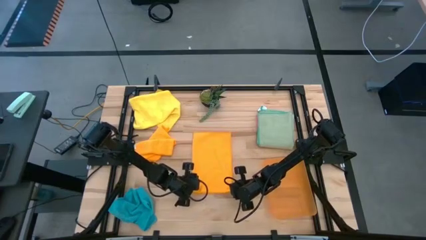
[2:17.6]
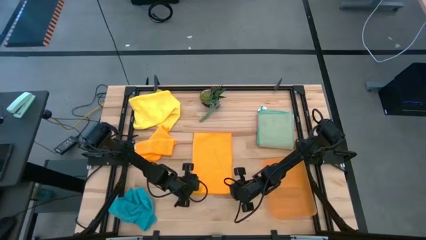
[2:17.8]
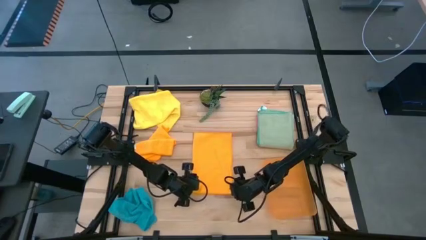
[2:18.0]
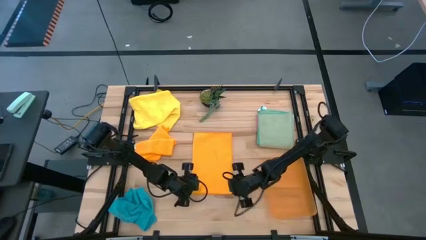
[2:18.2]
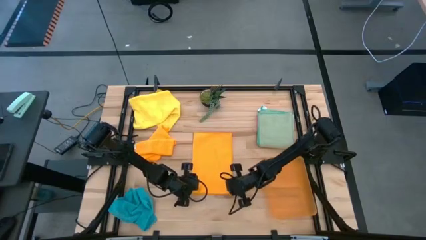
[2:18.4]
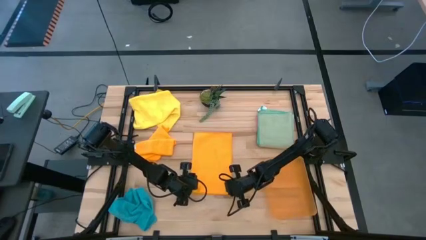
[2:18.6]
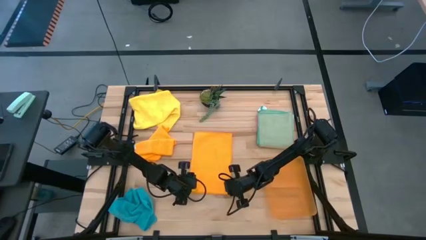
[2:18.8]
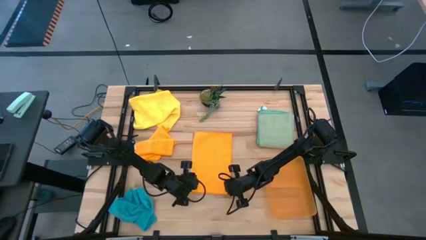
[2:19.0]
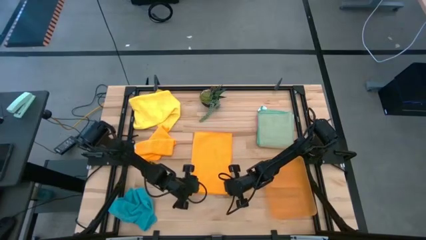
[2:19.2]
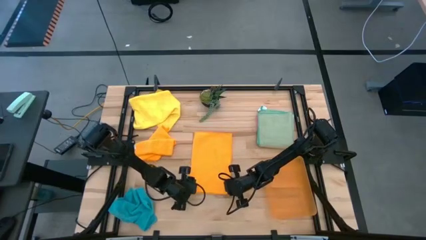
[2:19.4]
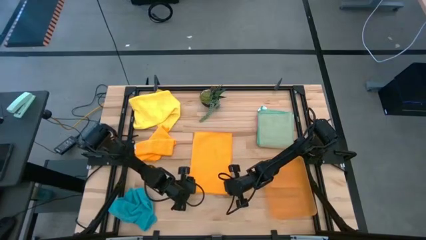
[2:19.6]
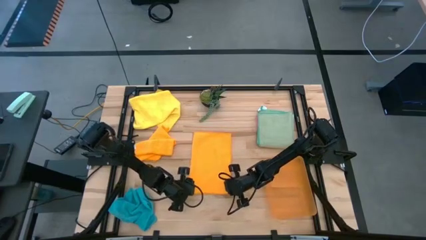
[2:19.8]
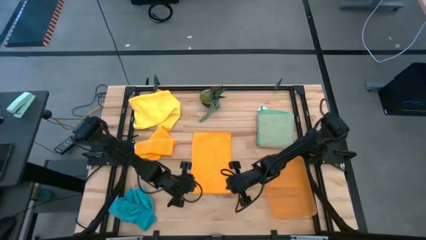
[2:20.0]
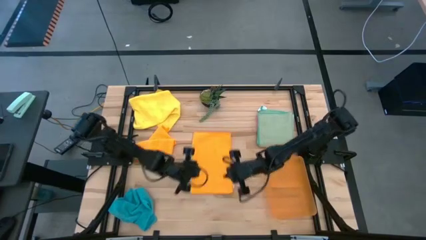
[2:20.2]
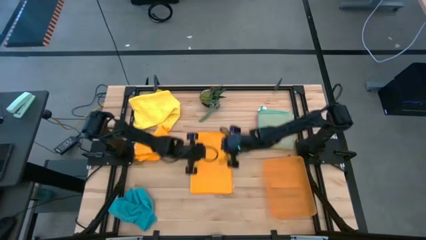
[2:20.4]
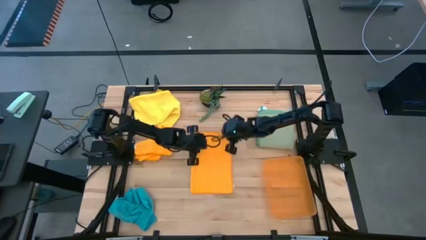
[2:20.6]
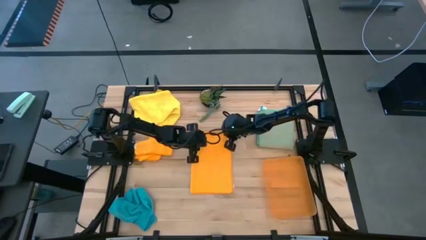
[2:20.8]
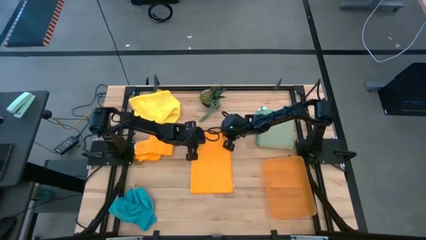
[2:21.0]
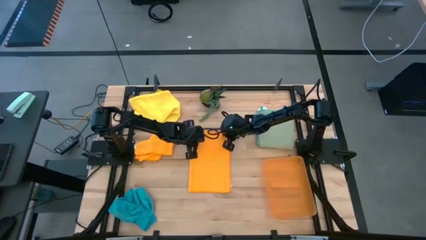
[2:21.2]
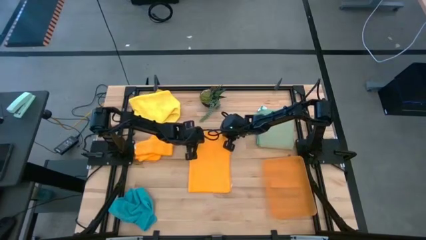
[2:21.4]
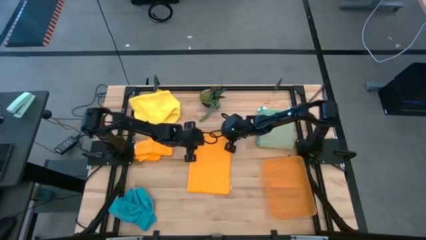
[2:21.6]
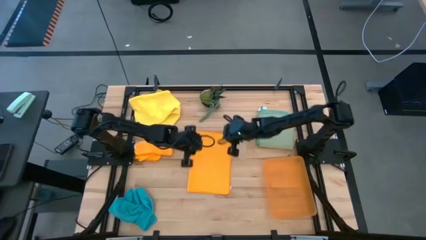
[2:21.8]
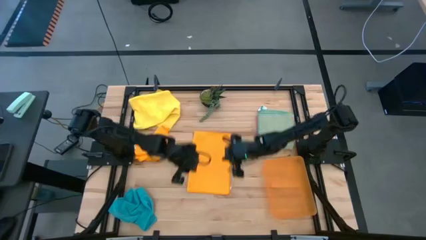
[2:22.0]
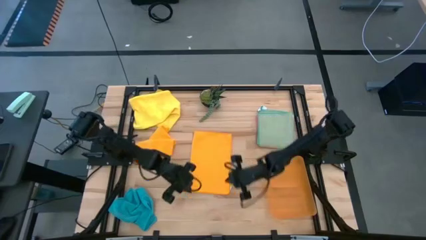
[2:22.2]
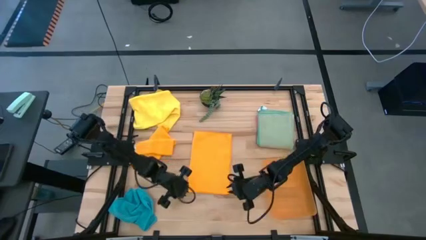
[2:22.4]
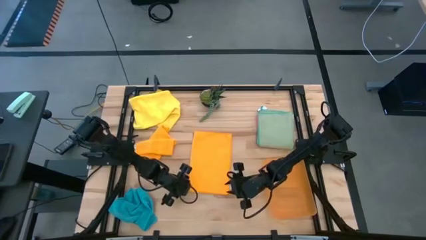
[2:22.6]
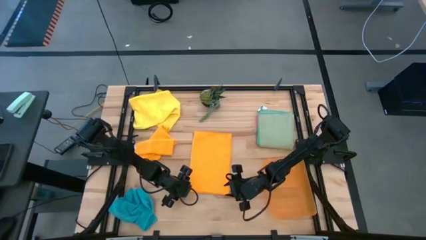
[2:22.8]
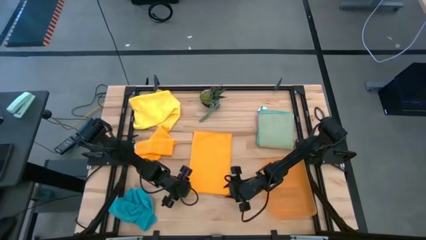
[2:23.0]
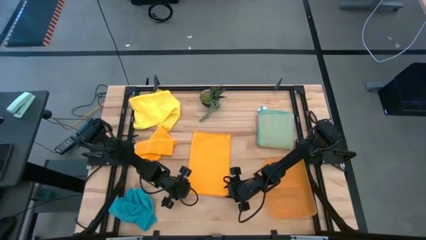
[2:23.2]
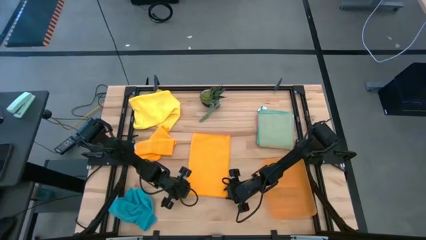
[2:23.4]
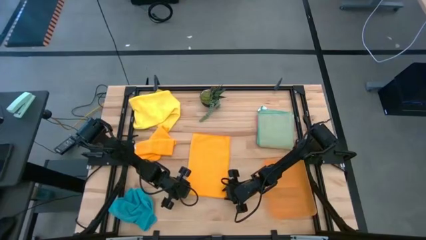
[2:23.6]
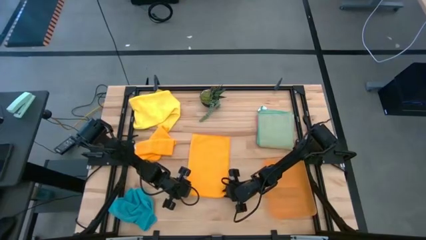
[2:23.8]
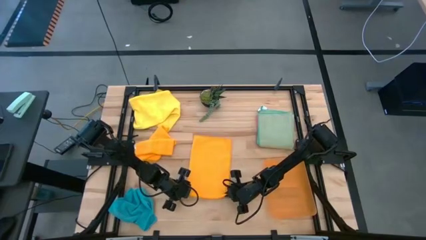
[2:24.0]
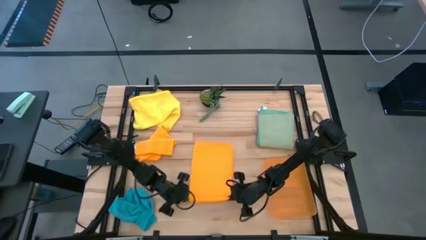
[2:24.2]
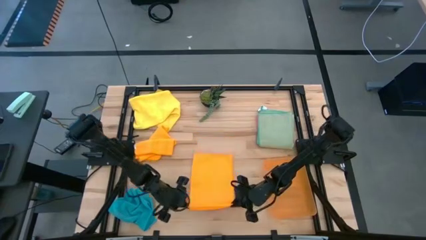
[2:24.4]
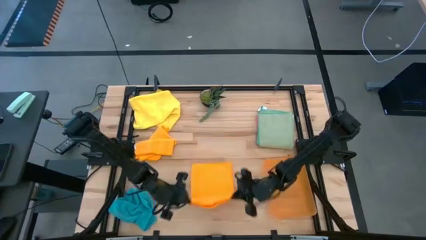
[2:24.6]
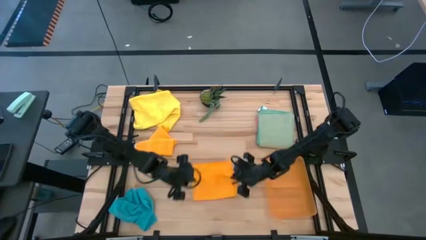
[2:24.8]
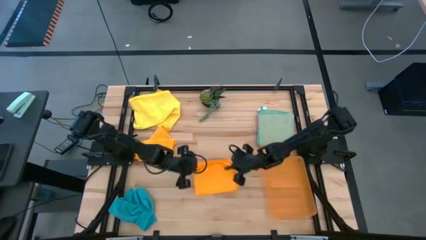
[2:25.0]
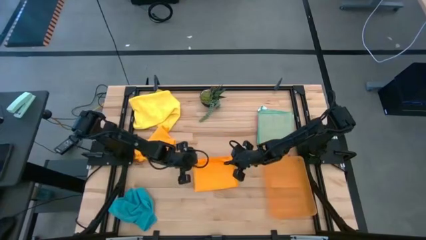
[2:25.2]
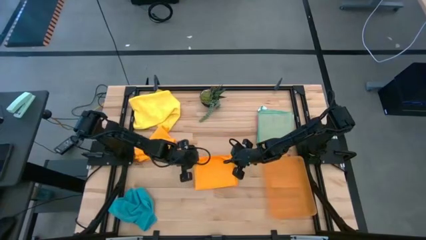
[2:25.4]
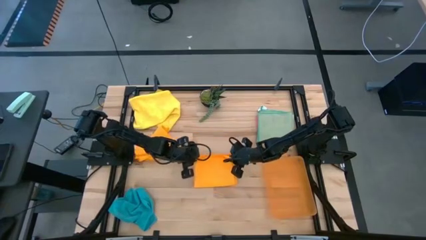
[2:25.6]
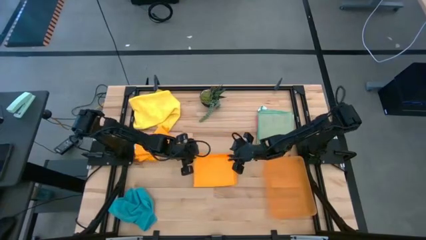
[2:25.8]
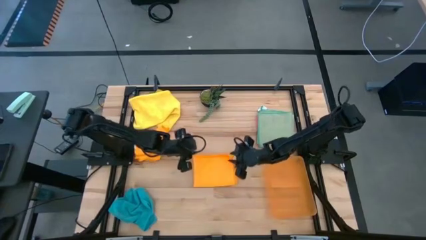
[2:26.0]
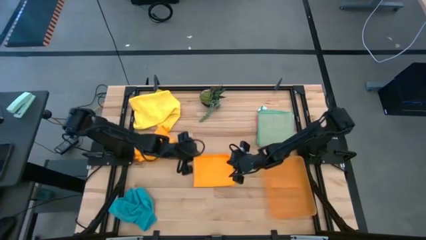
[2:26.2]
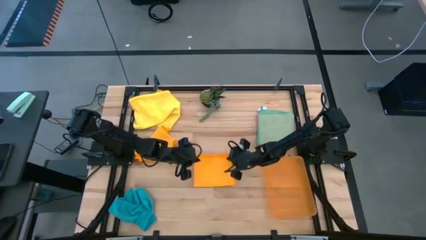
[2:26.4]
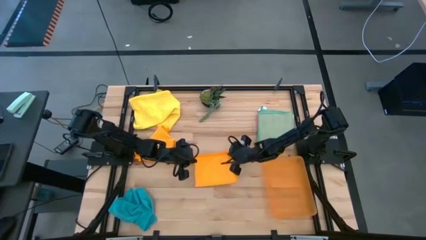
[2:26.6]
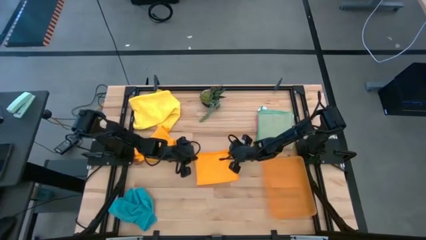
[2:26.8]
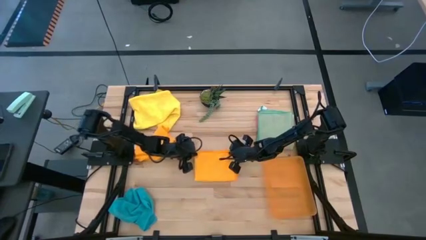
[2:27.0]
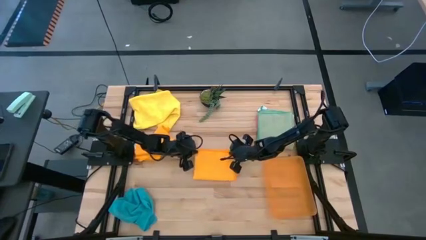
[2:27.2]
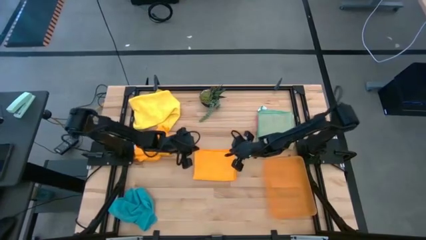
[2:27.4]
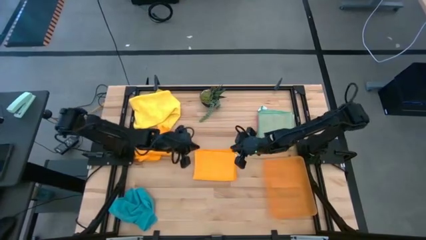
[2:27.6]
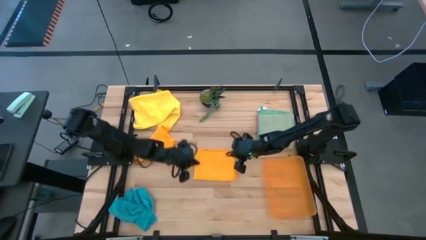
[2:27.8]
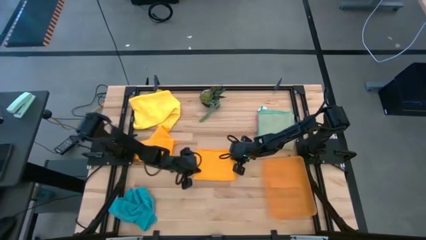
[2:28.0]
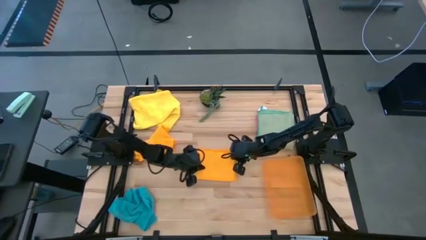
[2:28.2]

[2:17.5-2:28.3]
Task: Fold microfiber towels
Fold the right orange microfiber towel

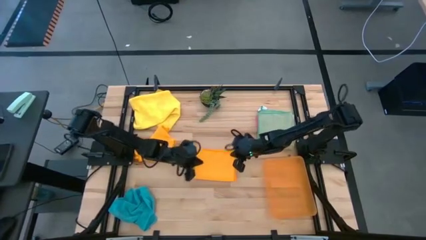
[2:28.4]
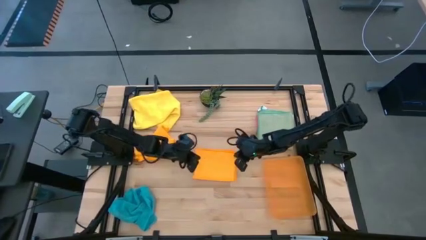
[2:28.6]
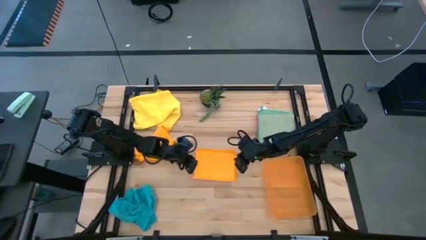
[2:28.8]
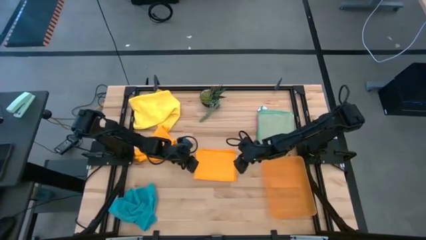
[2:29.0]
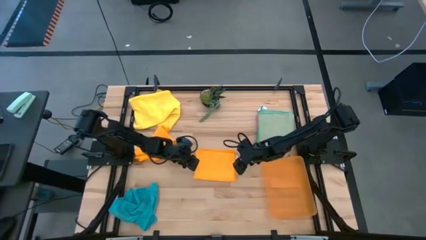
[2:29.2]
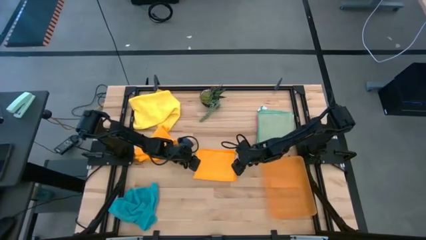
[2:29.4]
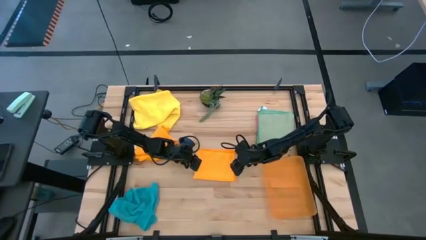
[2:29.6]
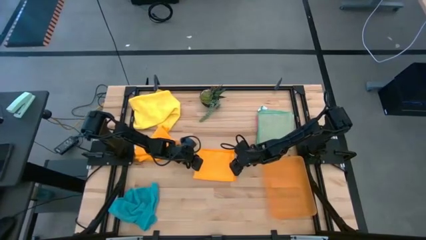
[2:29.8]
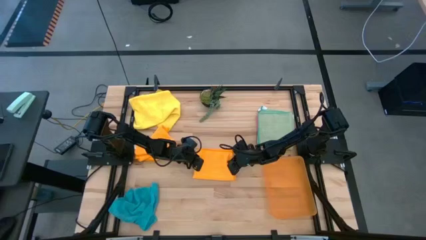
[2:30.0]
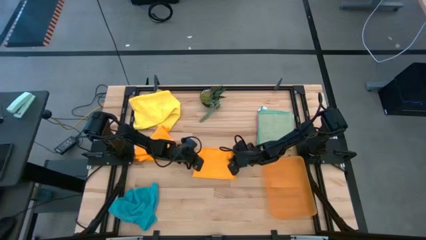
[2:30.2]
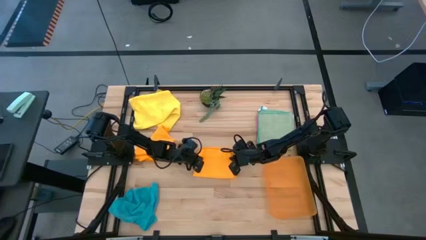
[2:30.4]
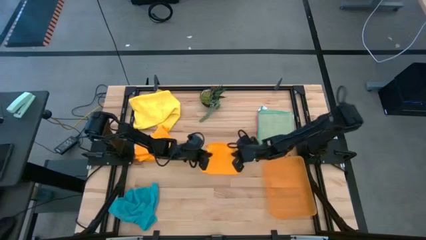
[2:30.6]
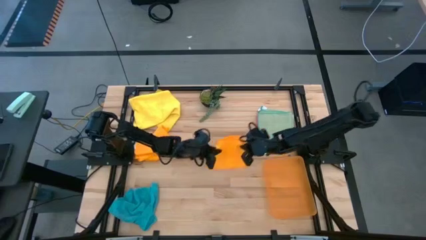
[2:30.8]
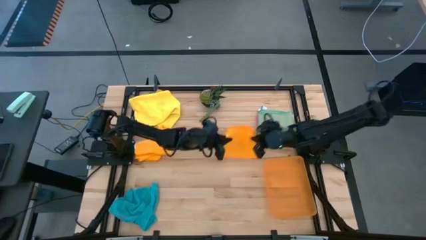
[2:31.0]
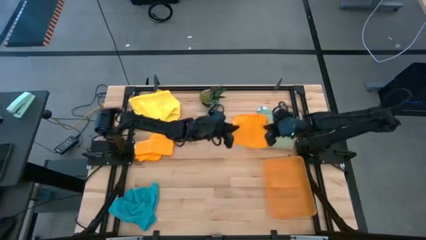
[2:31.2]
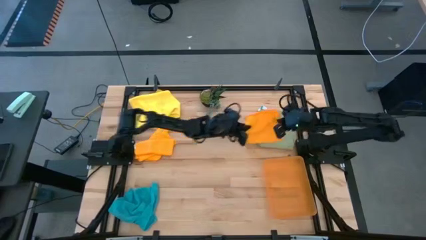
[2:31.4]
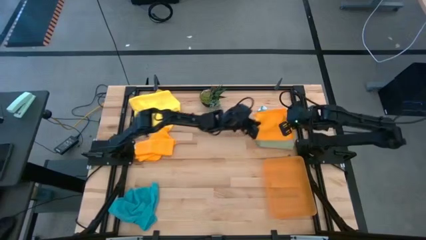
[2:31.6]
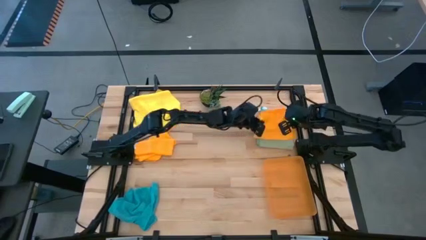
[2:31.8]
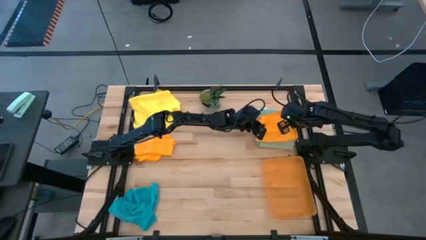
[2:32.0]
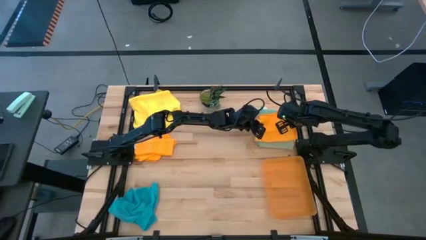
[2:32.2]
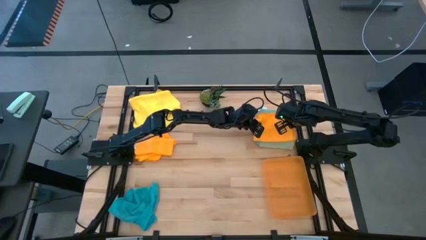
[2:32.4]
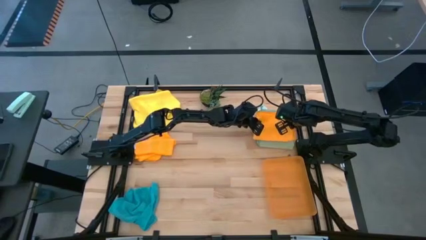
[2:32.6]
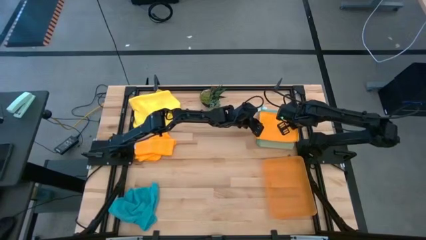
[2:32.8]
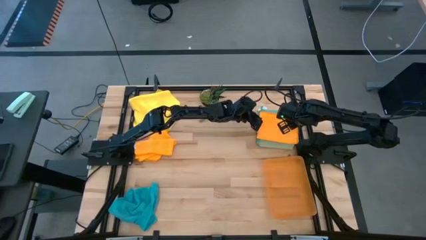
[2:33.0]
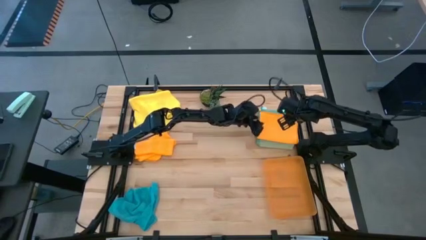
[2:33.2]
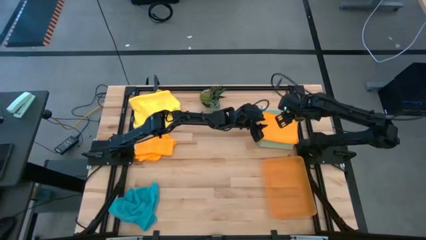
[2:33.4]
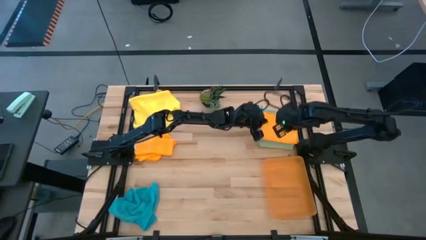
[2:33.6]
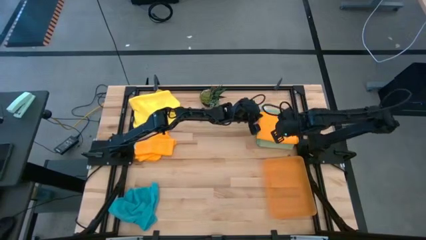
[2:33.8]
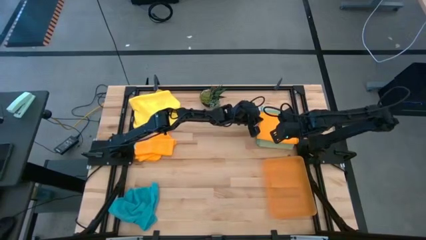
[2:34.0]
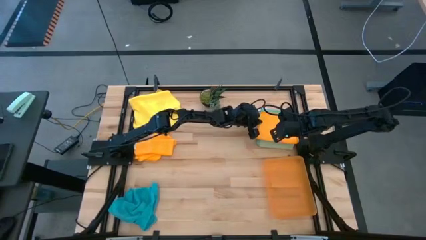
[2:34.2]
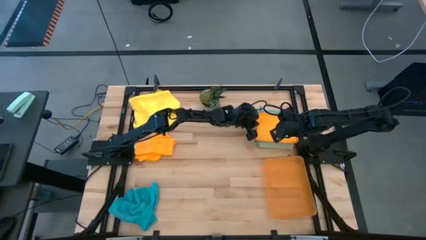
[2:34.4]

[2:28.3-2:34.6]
Stack the right orange microfiber towel on top of the green microfiber towel
